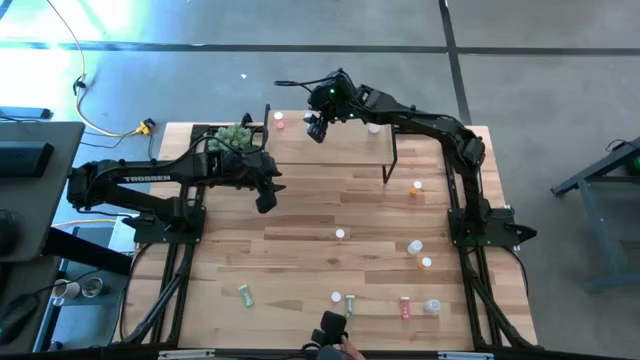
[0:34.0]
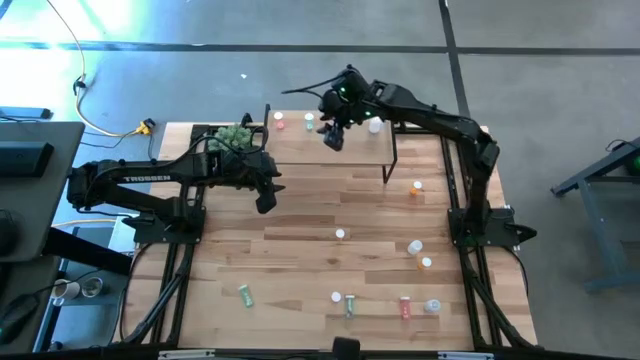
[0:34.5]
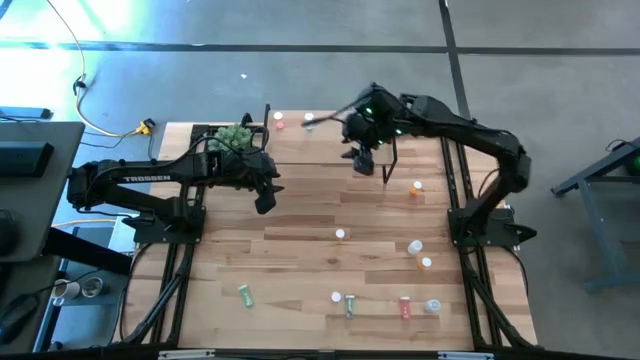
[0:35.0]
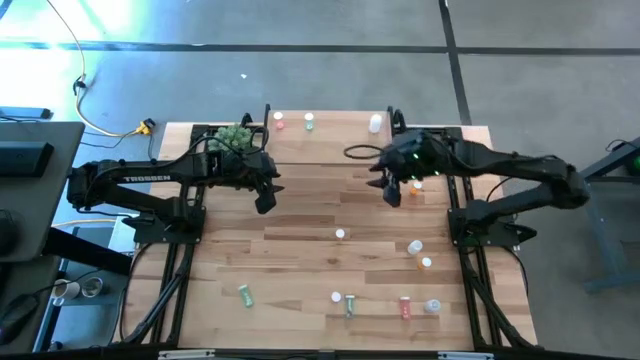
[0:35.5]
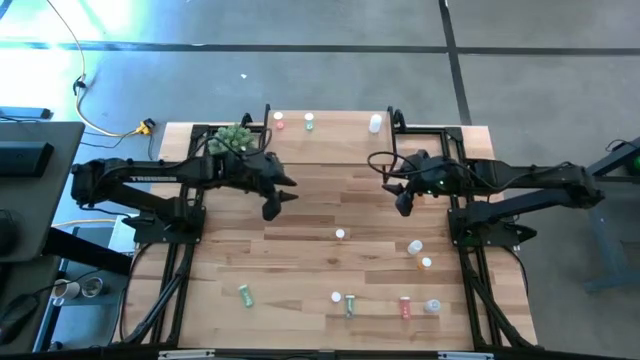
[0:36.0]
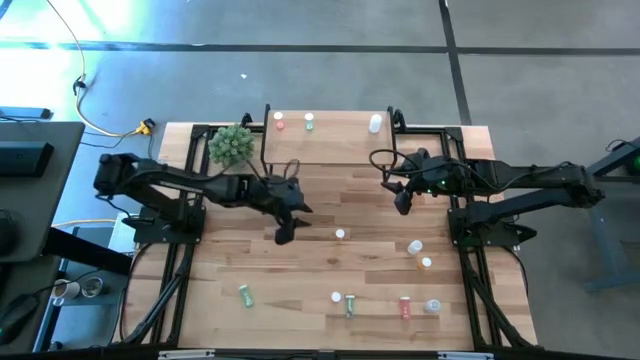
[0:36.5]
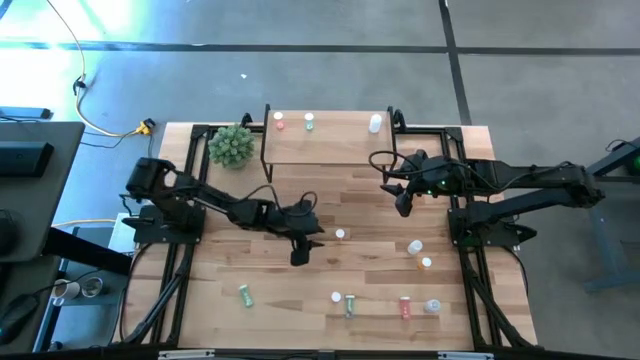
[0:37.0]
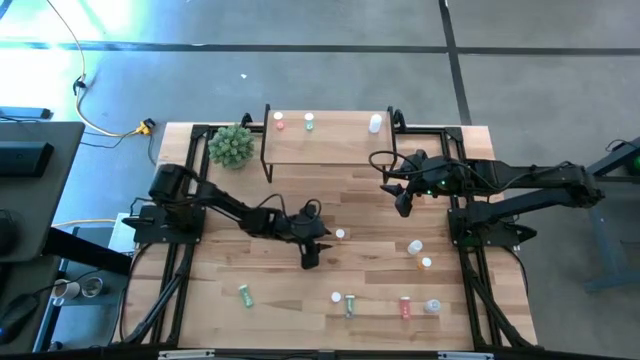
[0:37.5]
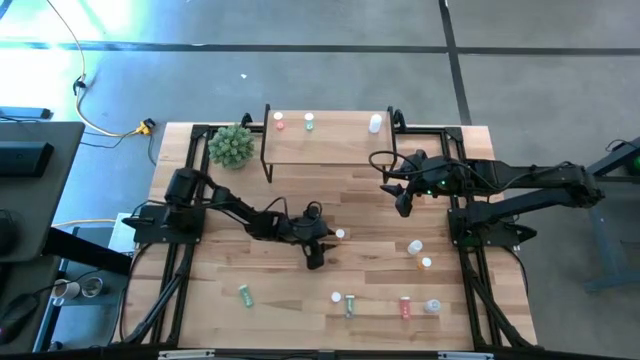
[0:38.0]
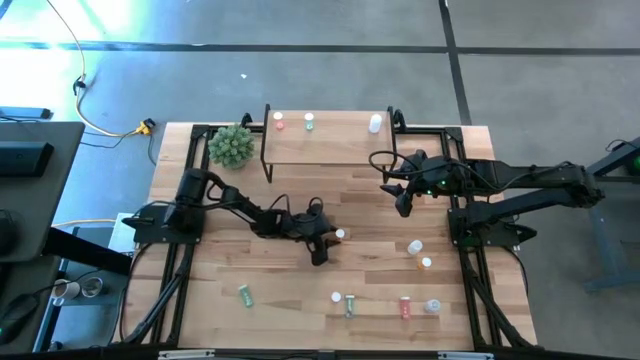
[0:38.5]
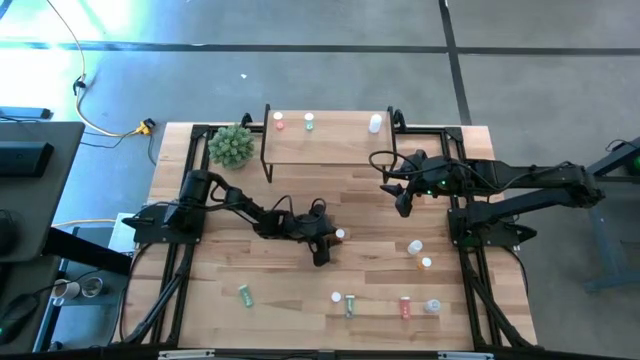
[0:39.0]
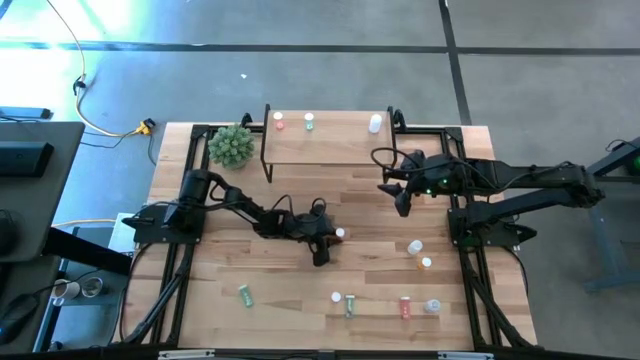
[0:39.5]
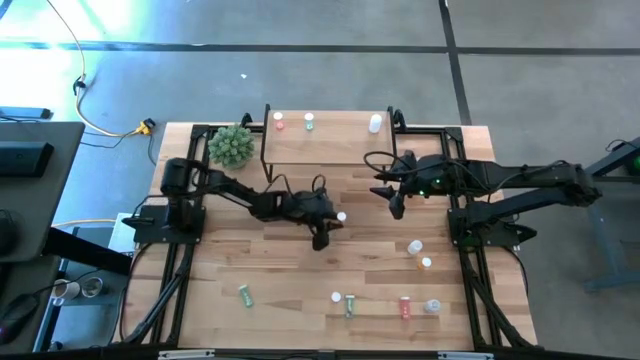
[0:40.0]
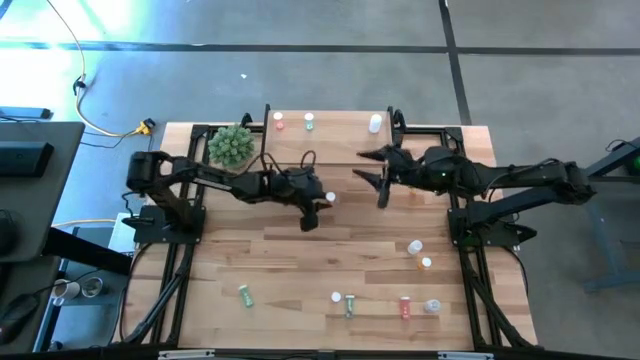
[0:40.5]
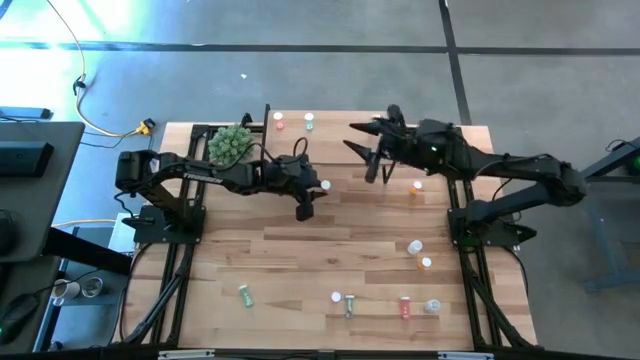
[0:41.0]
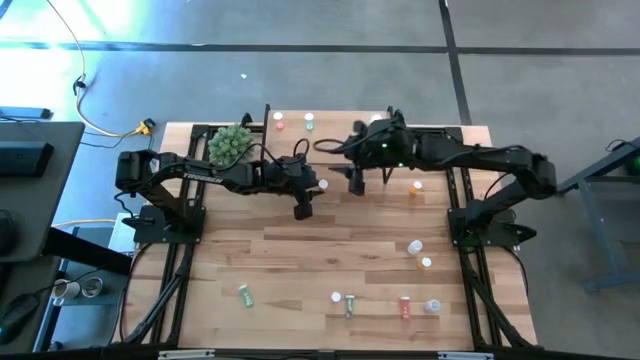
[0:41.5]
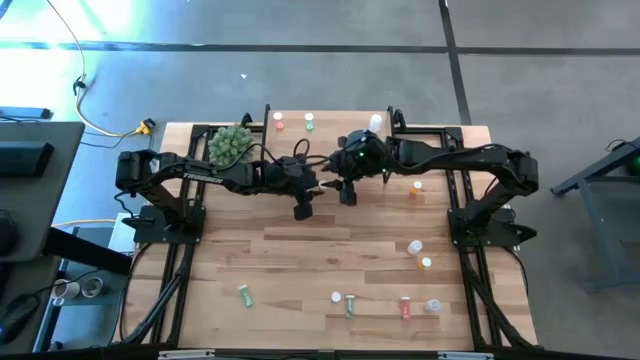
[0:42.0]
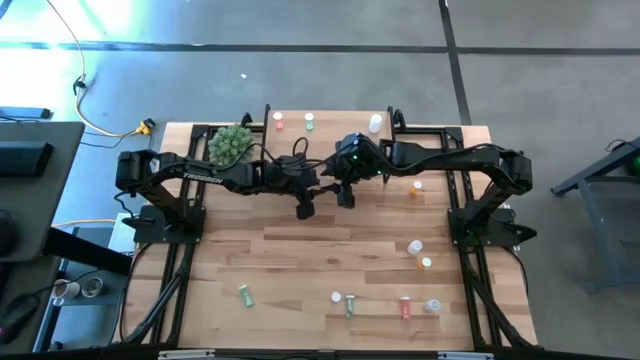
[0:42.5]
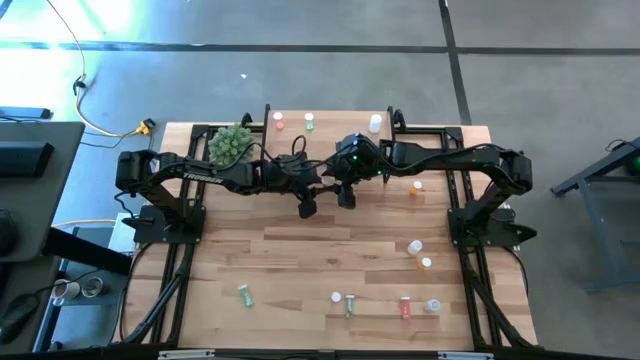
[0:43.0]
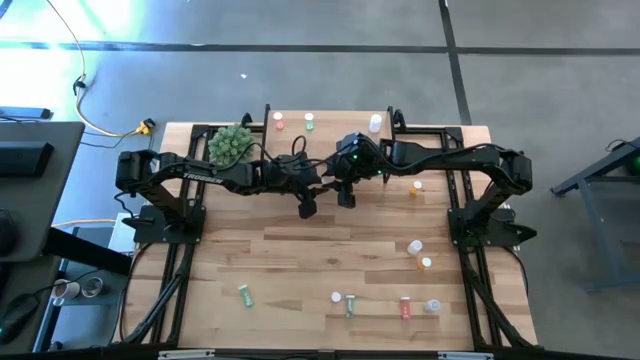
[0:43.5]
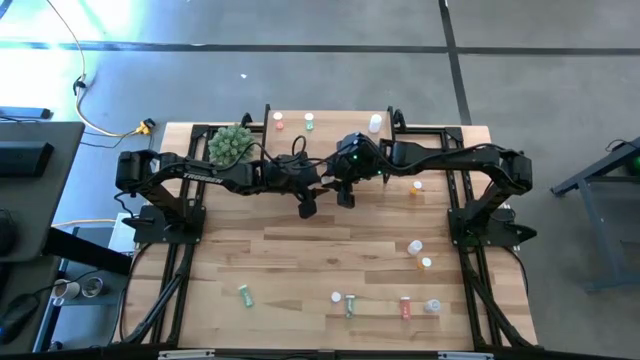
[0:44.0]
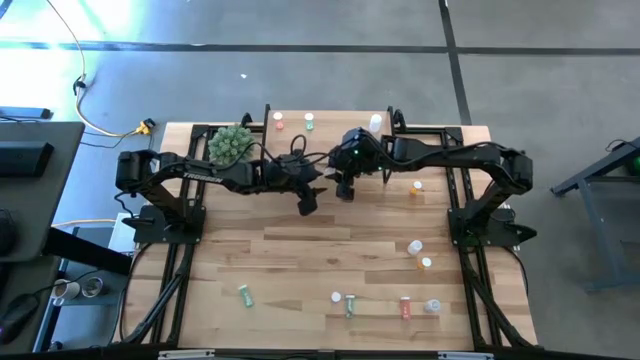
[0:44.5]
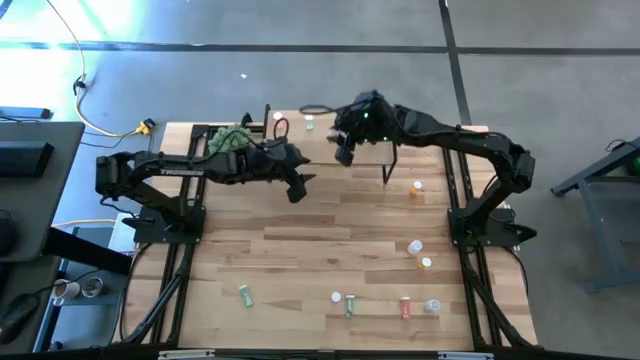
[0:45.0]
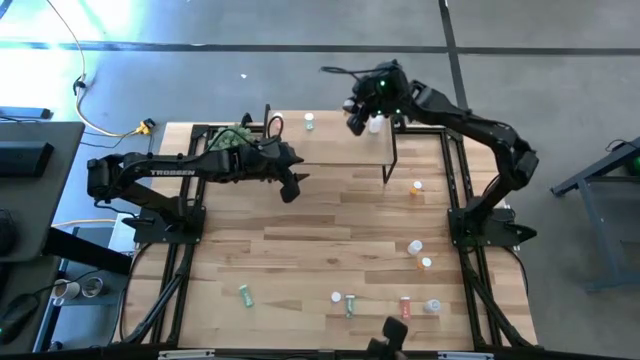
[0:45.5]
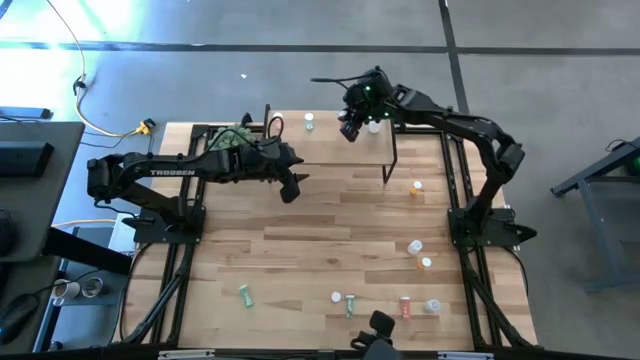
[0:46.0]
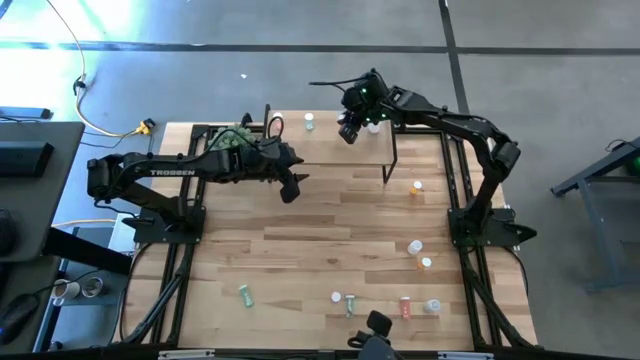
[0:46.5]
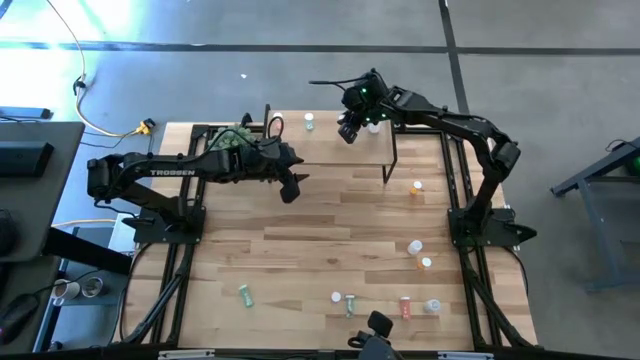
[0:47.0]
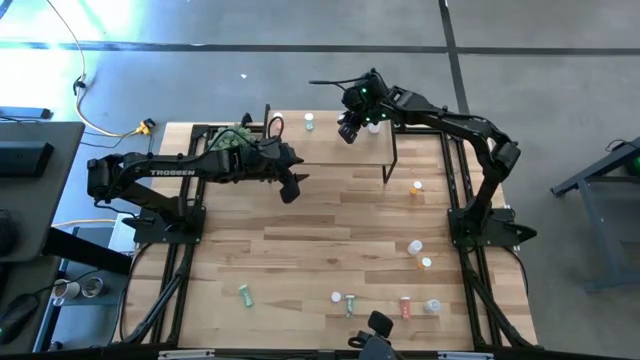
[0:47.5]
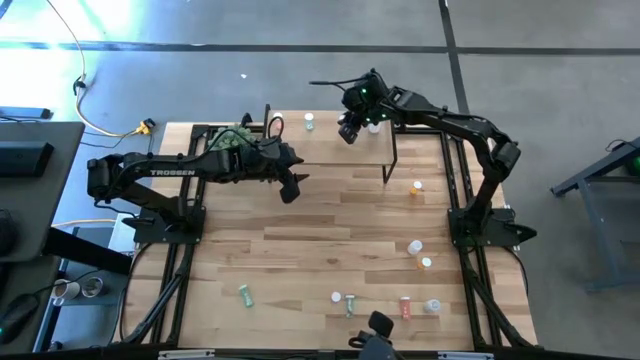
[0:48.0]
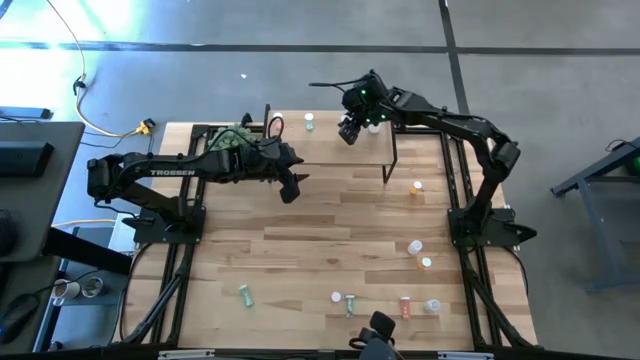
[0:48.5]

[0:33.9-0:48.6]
Task: Pick and place medicine bottles onto shelf by color
Put the left orange pill bottle on the shelf

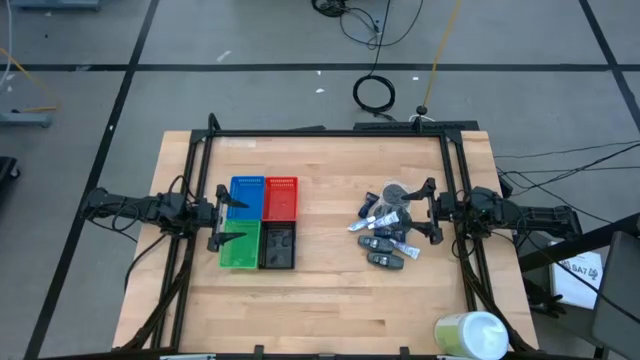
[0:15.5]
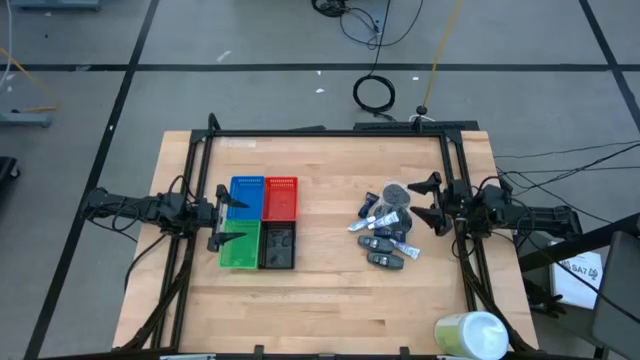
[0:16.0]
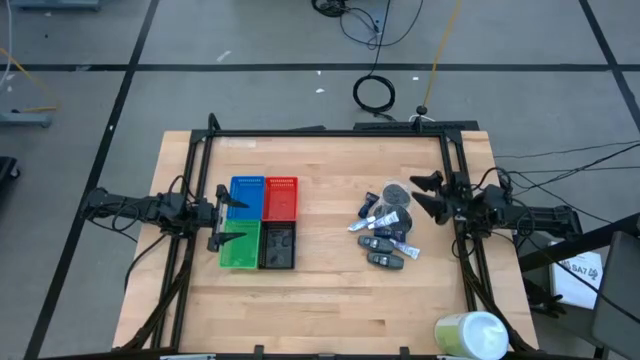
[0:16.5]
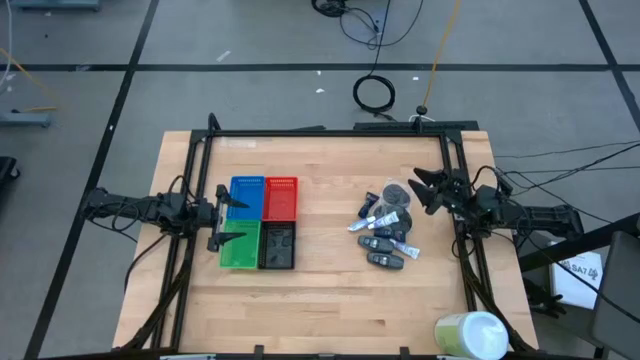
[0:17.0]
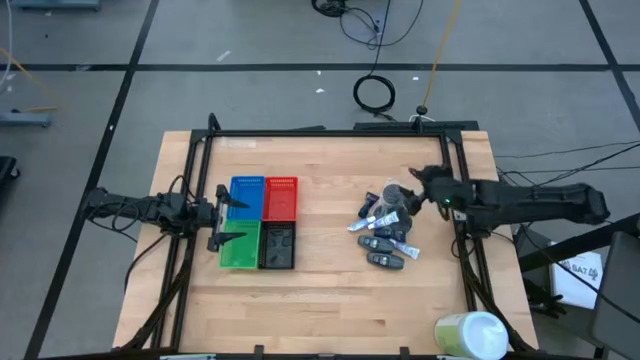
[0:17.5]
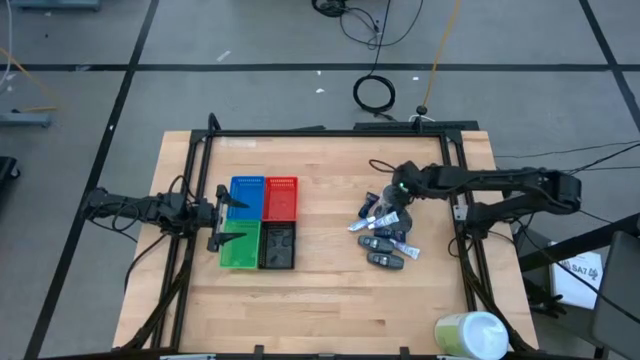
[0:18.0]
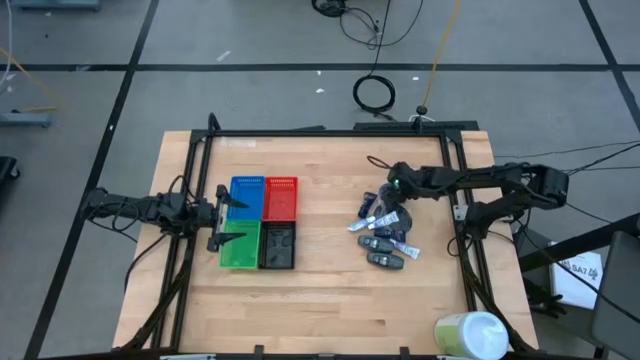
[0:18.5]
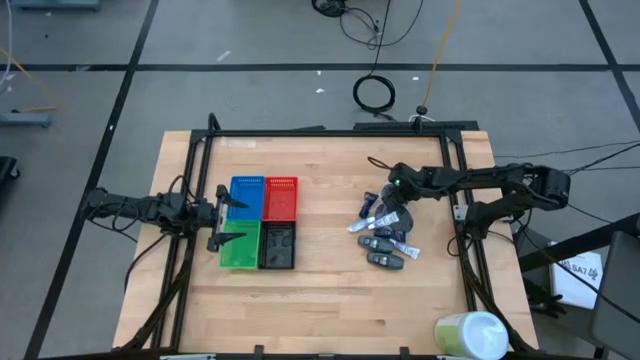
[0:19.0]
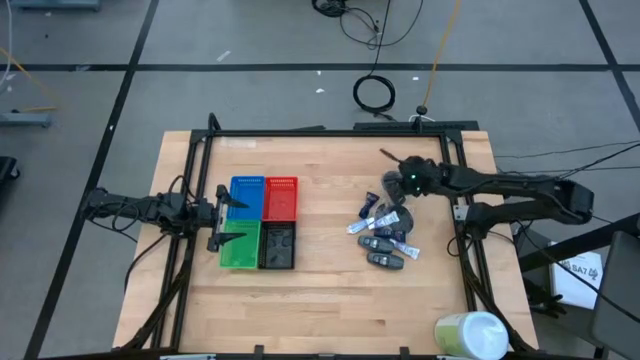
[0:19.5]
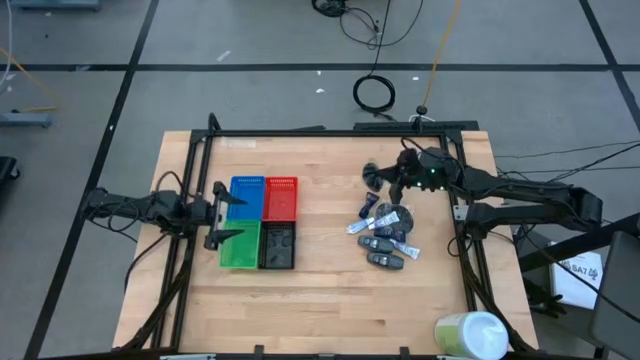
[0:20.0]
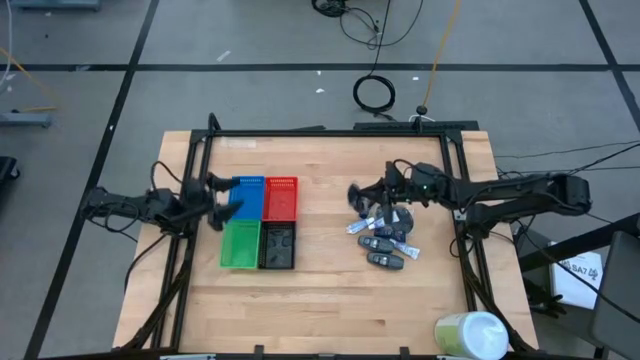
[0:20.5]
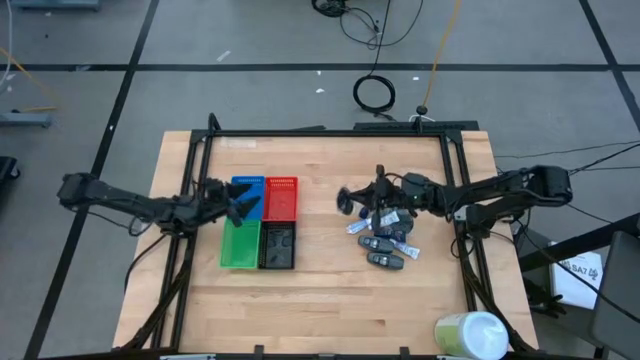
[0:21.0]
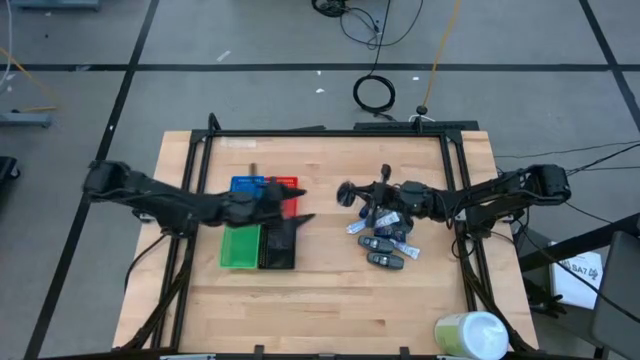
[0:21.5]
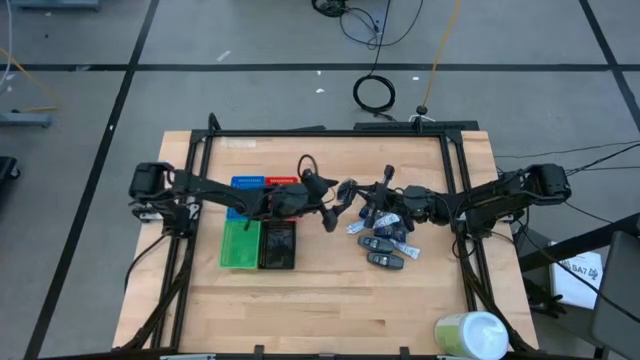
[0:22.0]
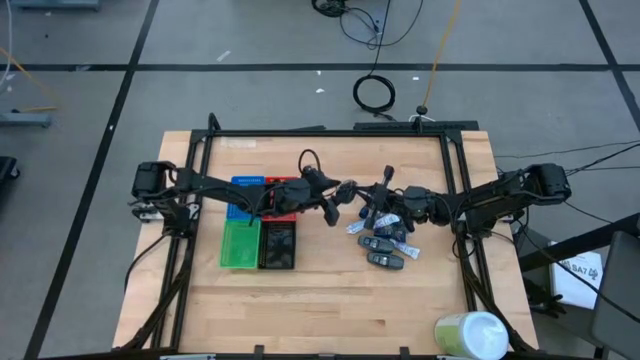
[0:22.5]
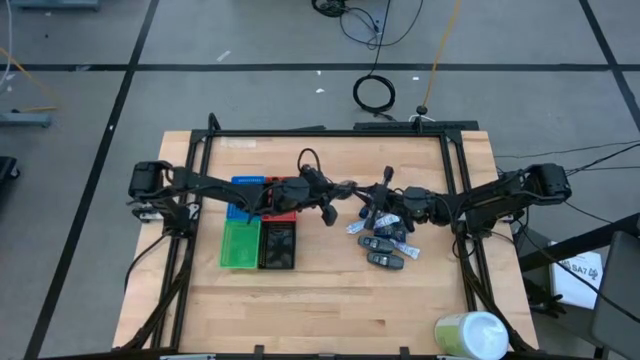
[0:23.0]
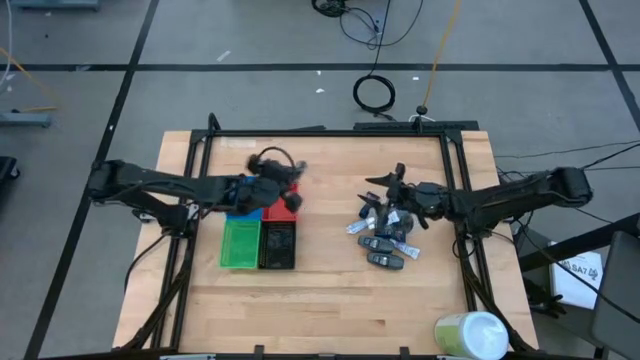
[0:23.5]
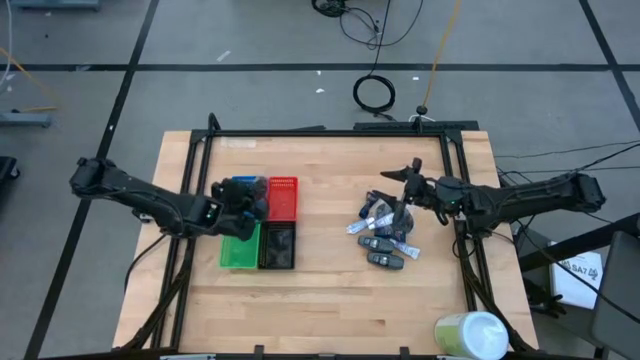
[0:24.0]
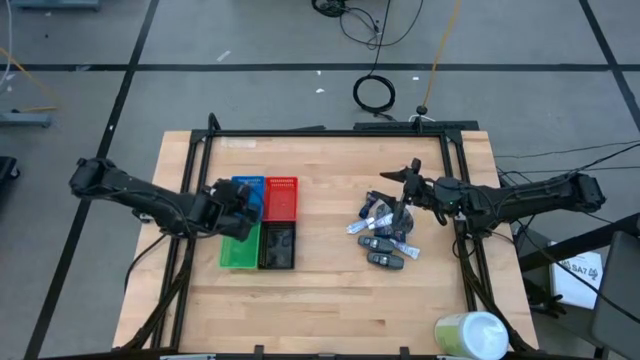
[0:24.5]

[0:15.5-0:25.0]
Task: Pick & Place Travel size toiletries
Put the top black hairbrush into the blue bin
